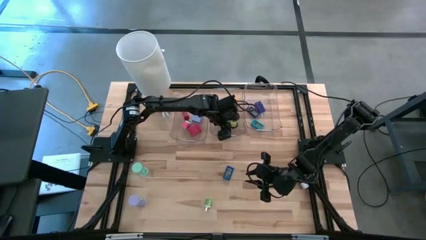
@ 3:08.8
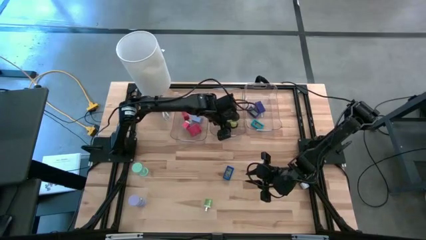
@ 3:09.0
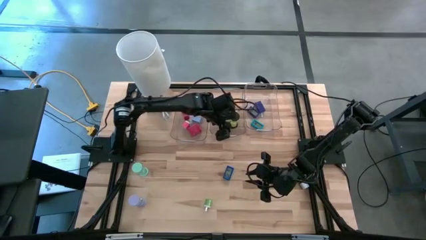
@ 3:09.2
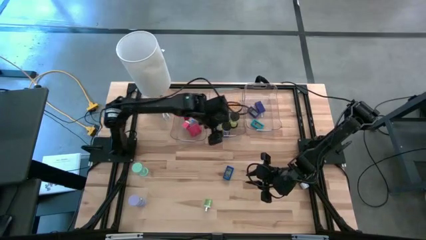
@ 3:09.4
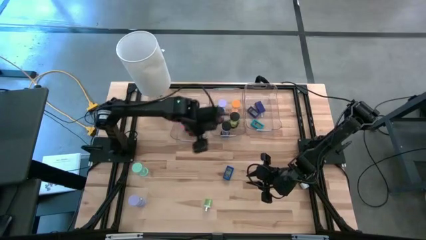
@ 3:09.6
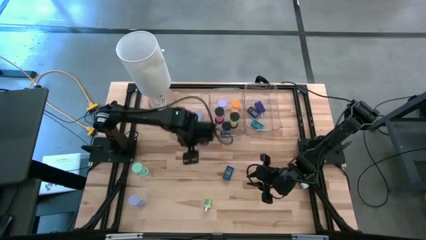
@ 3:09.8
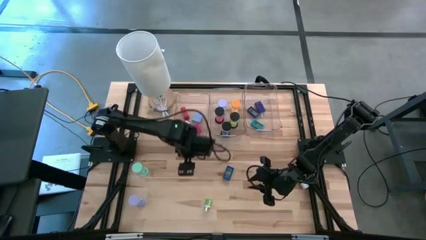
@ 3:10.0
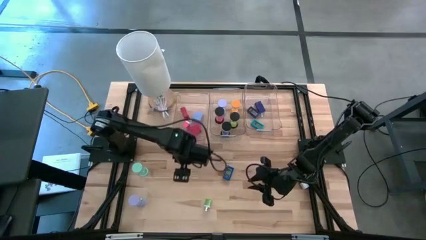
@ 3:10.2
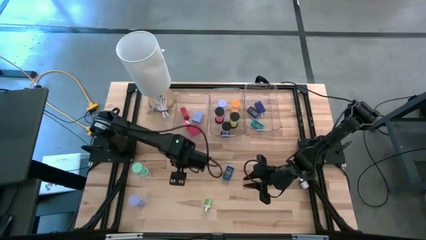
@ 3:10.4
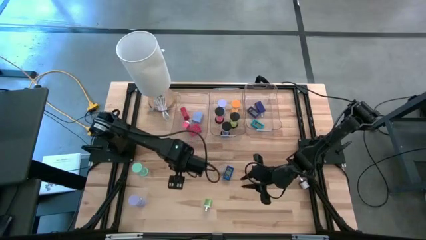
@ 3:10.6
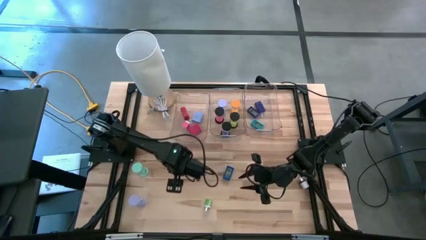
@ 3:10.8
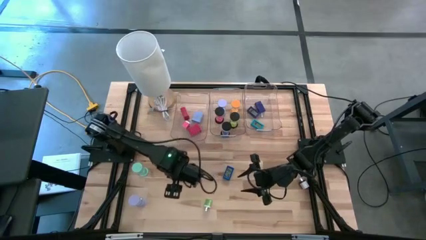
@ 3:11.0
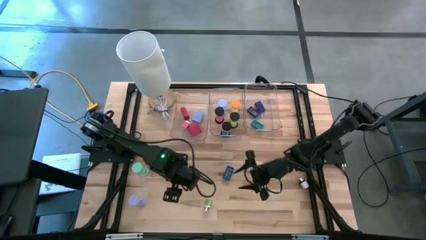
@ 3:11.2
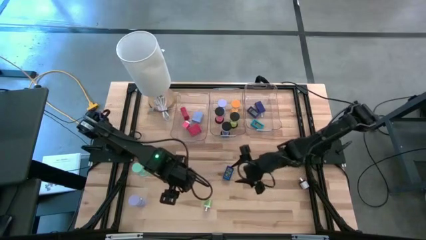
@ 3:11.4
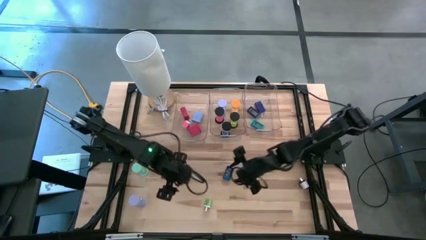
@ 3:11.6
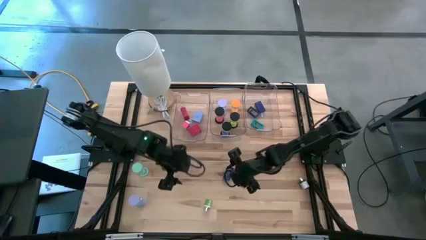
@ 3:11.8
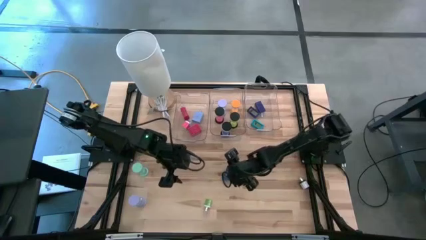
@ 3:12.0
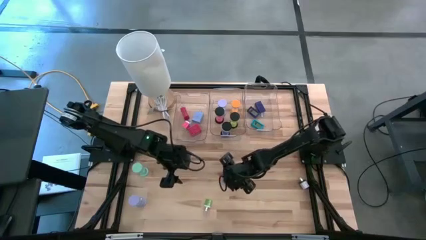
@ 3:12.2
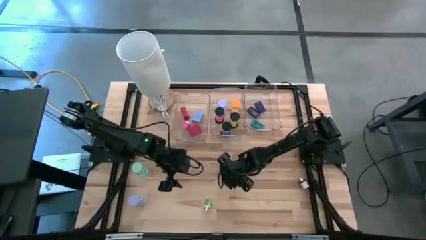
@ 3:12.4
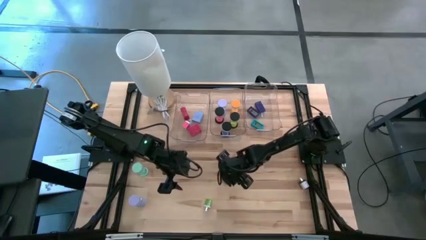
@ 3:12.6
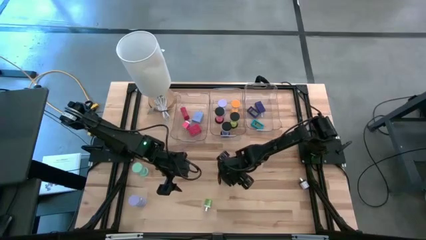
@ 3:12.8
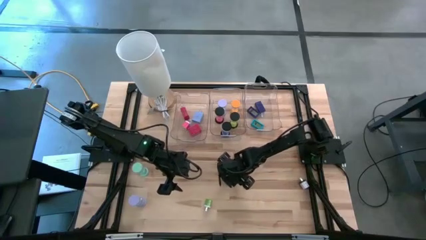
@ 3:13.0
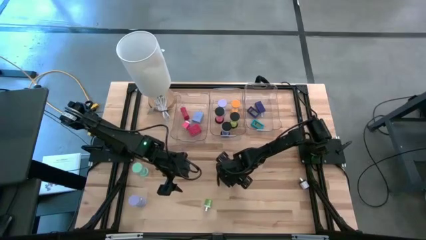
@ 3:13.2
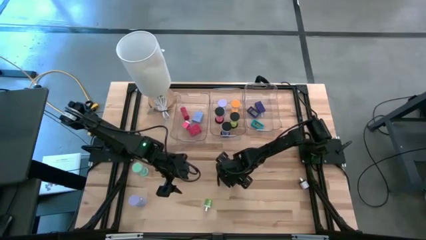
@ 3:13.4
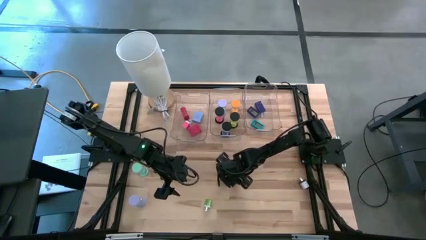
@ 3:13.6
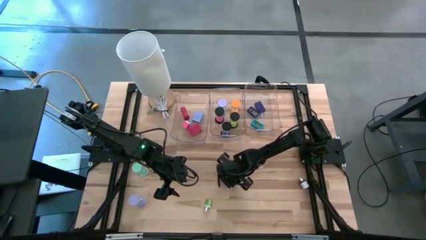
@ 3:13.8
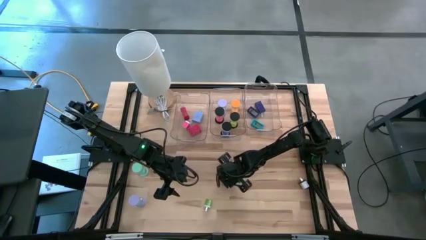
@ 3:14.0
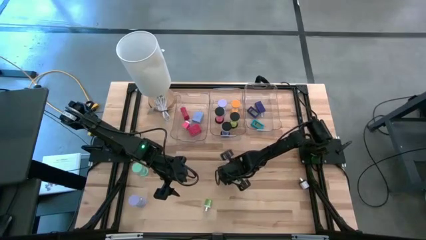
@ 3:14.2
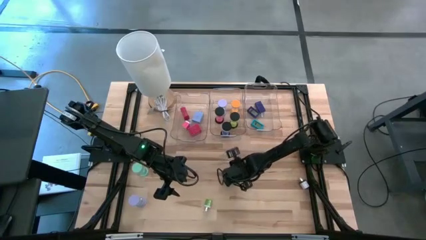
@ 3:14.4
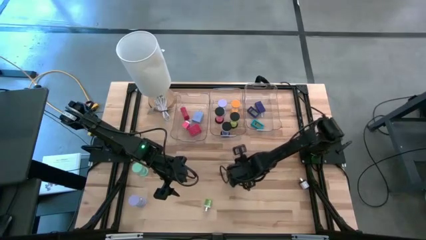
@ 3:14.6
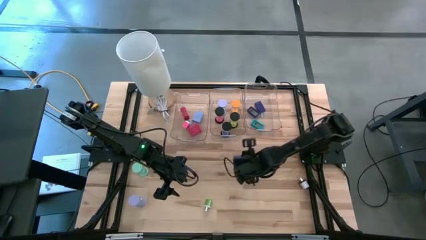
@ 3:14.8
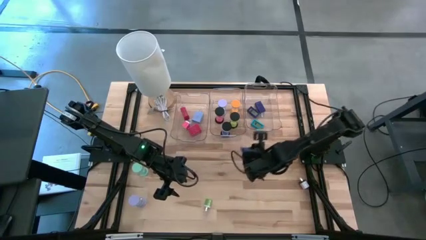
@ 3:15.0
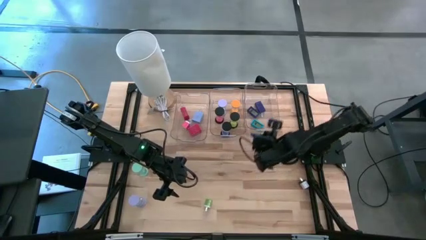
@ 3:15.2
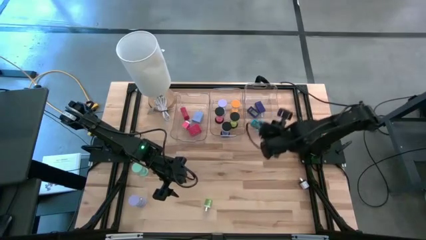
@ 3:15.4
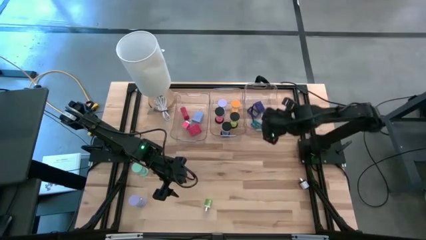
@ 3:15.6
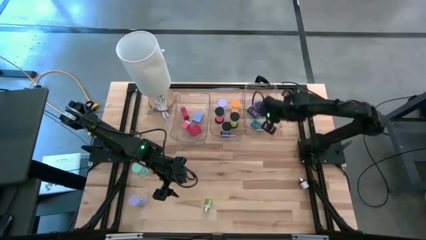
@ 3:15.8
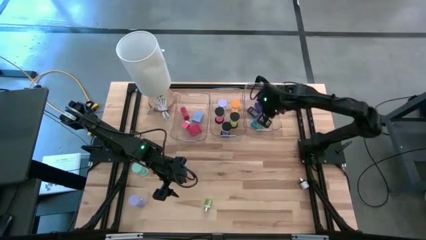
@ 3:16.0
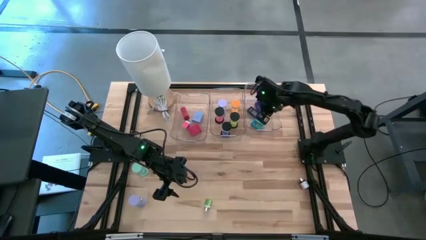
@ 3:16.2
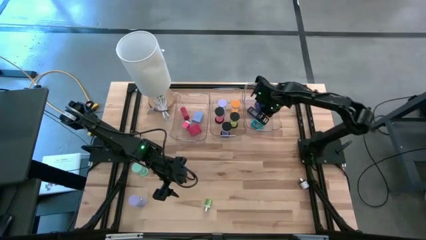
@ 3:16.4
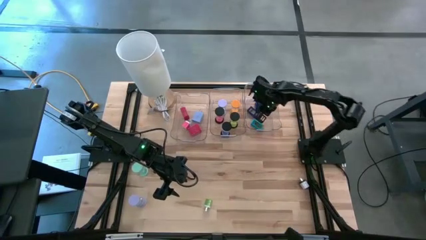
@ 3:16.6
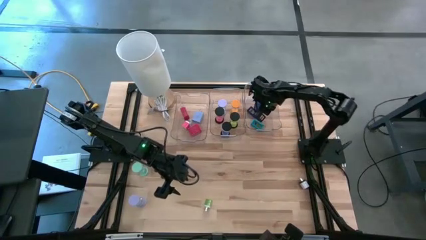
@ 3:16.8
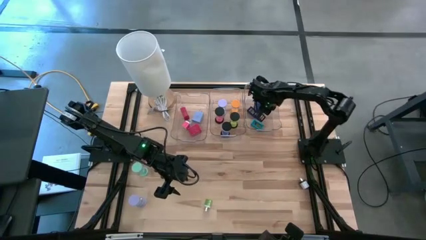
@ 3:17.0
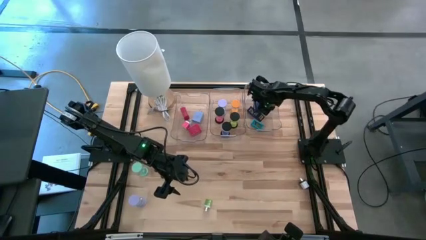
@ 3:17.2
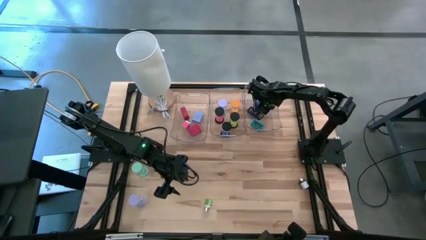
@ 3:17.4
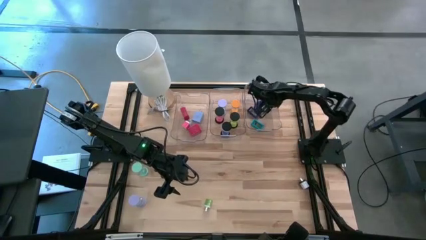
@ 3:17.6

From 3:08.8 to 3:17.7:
Task: Pick & Place Office items
Put the blue digital clock into the right transparent bin
